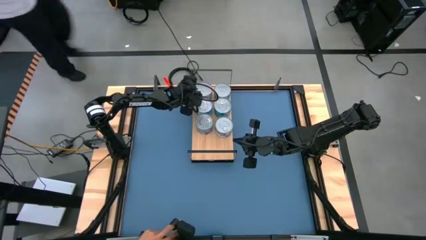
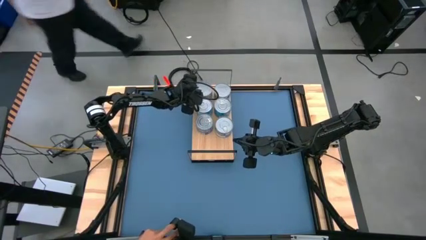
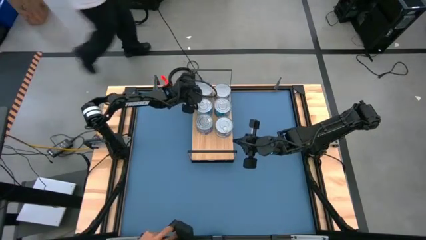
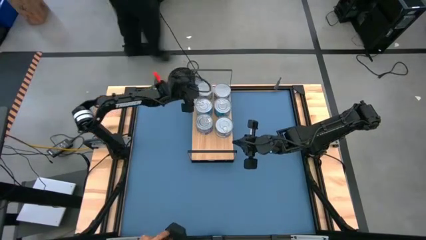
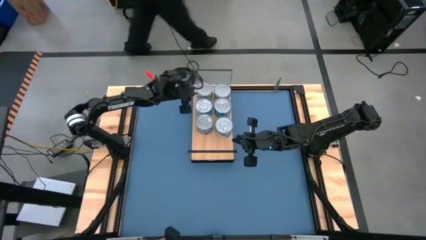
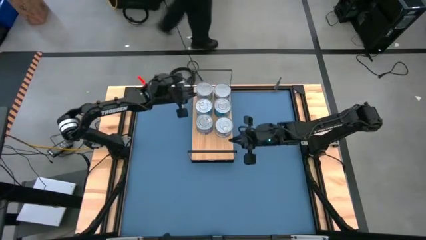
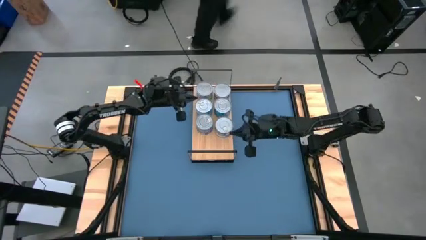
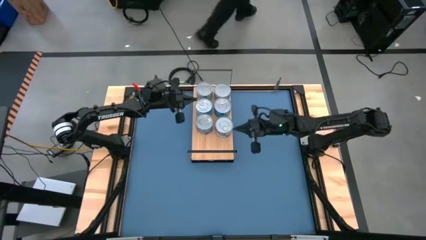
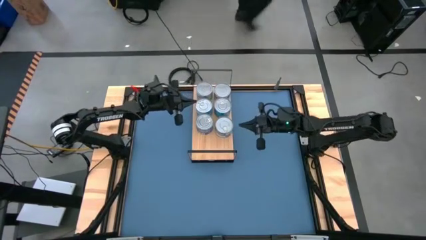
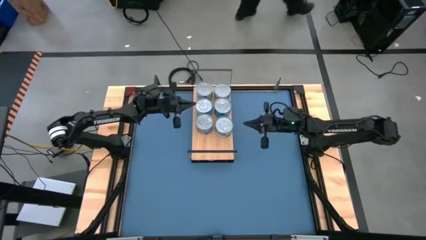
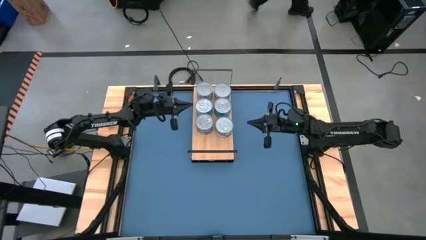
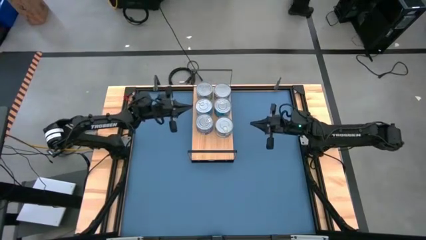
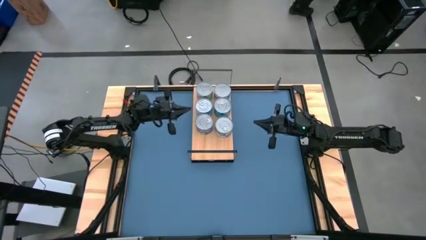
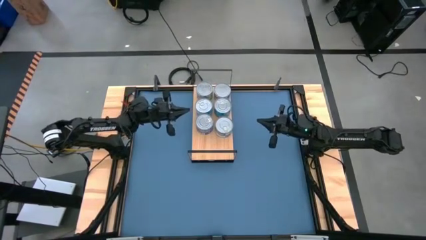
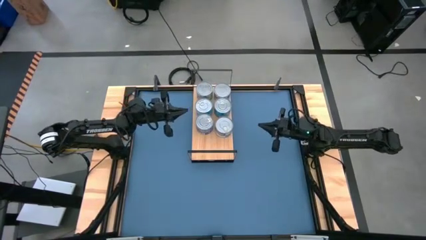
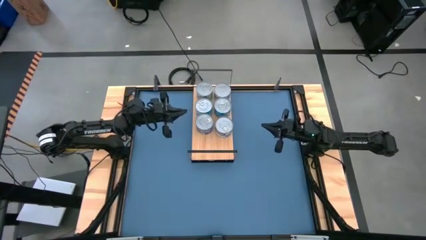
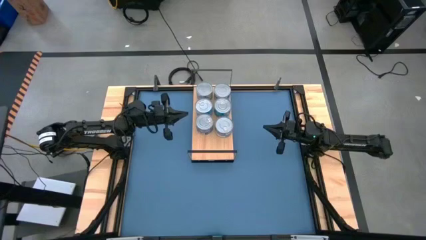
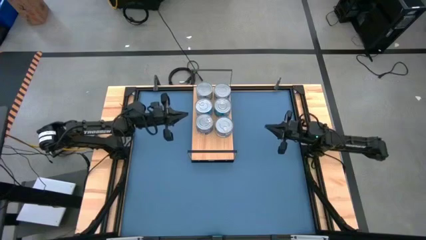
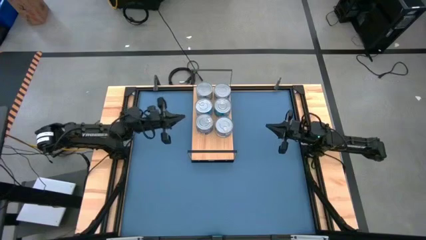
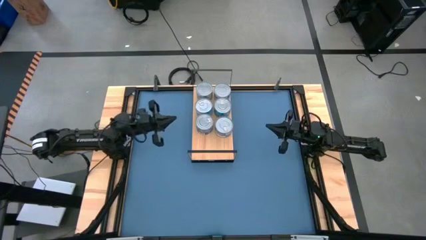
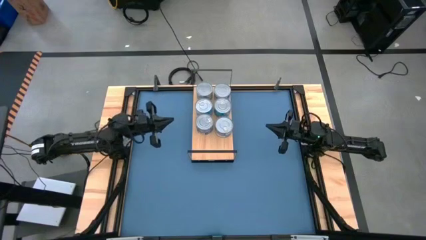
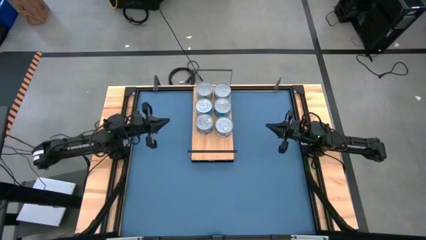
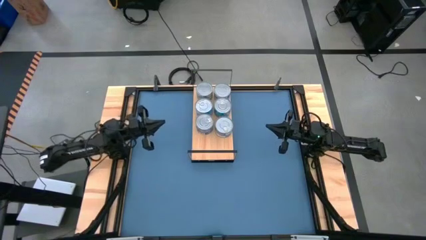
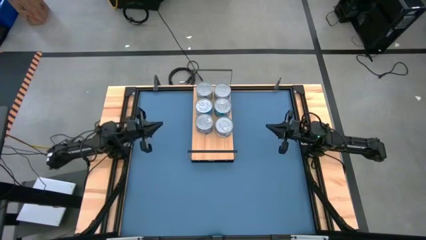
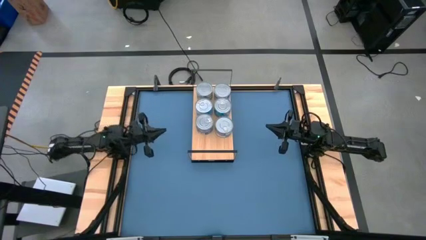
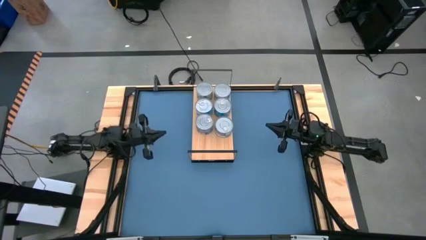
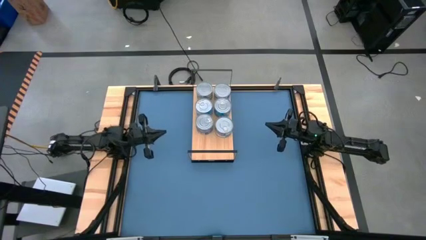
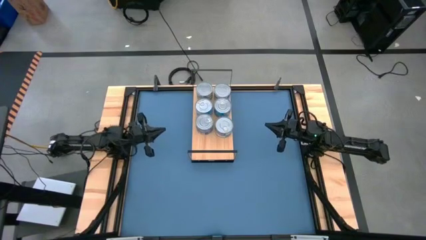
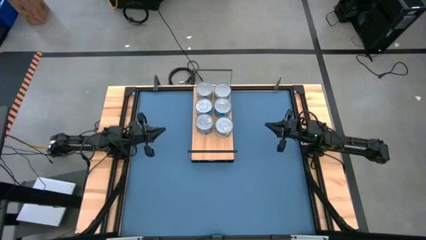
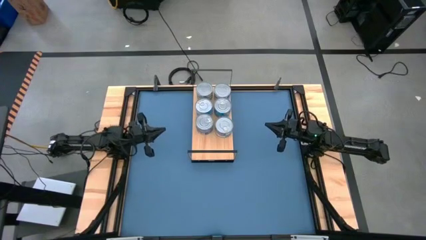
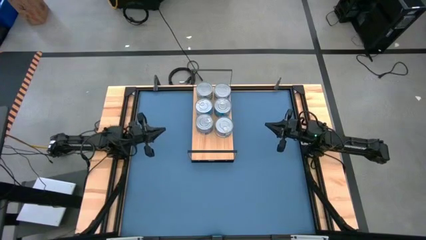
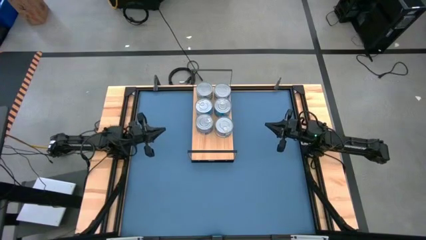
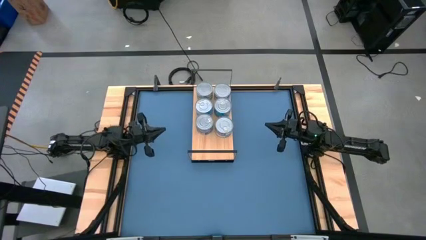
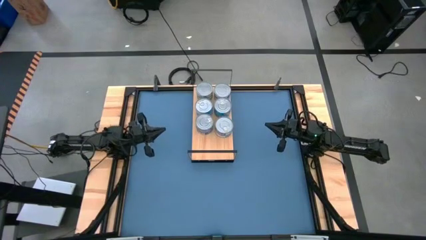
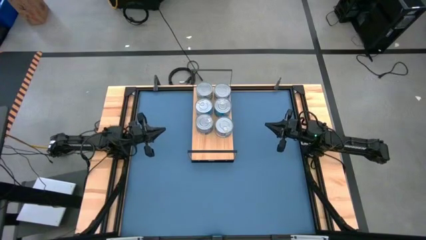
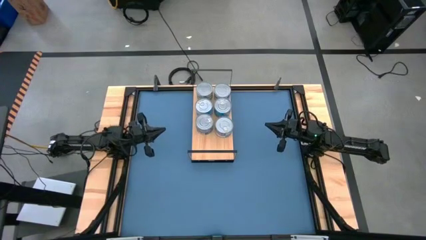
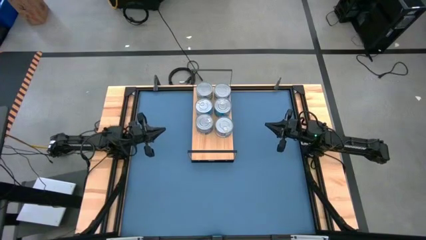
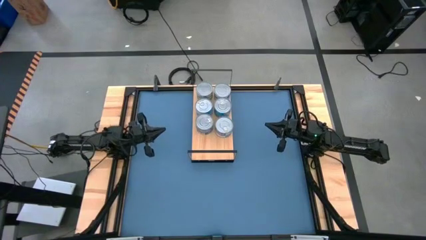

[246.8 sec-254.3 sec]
Task: Stack canned seafood by type on shelf
Return to Home Position

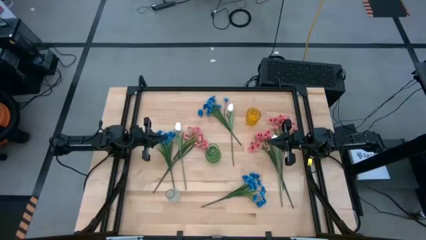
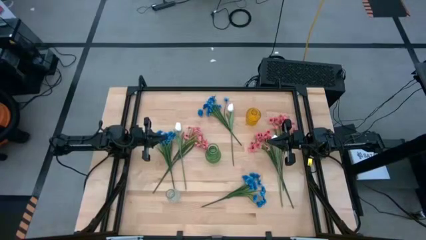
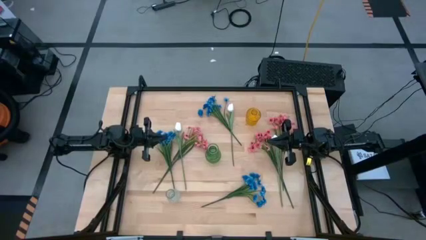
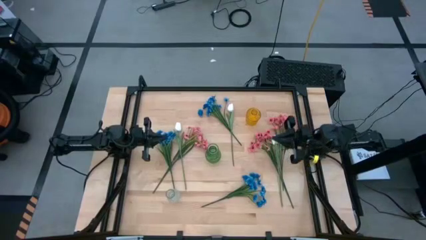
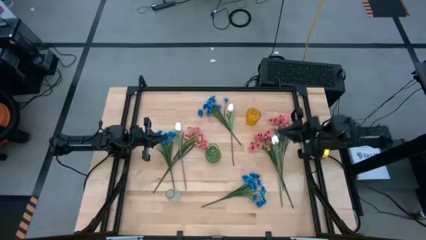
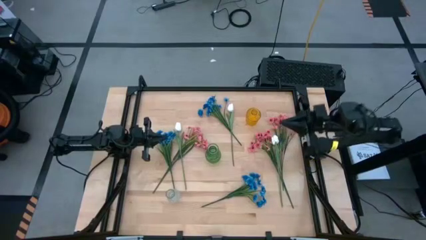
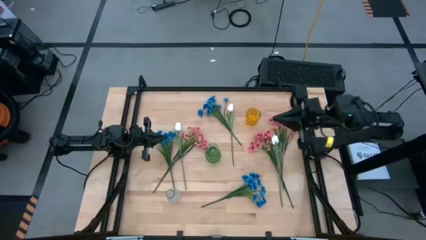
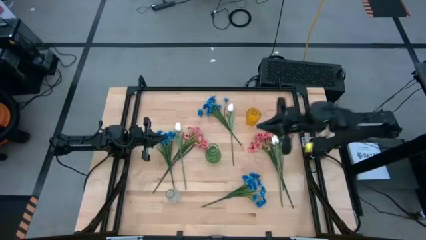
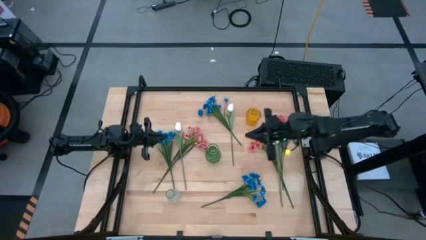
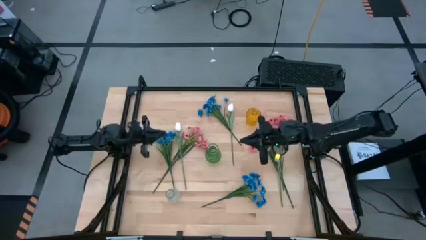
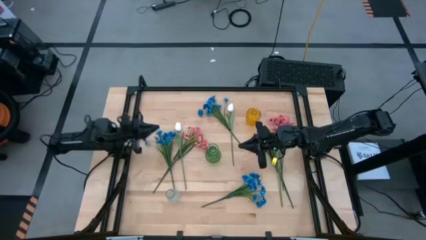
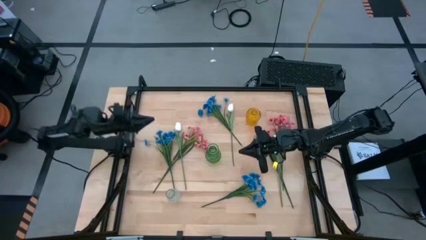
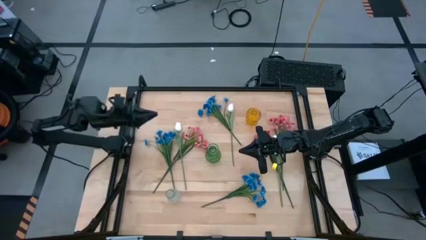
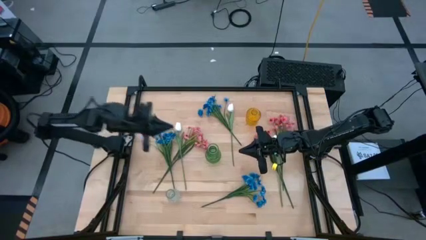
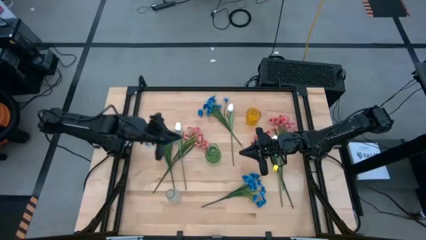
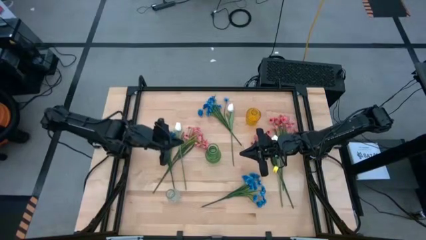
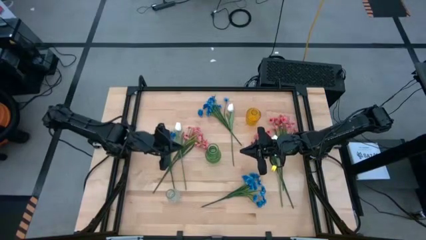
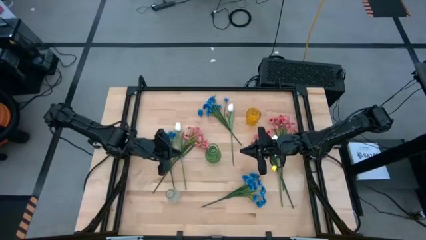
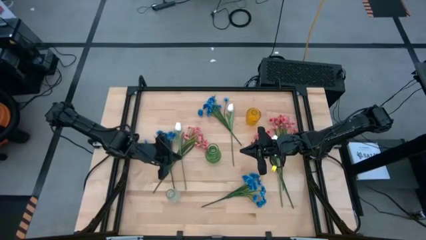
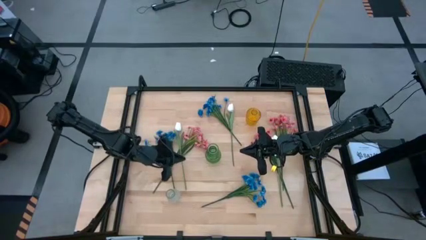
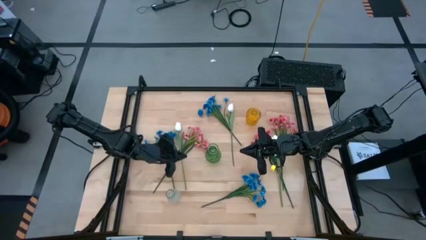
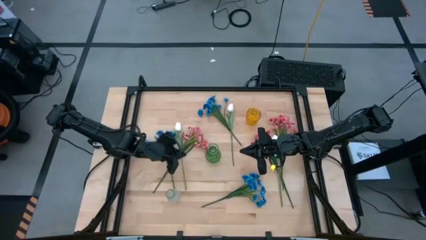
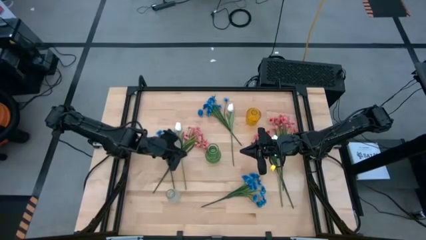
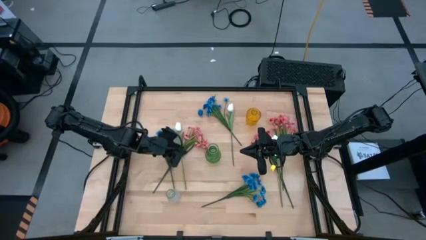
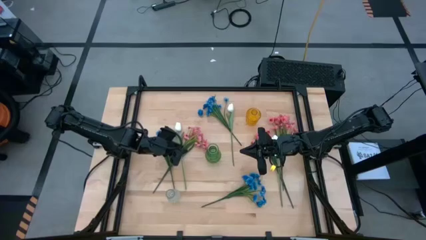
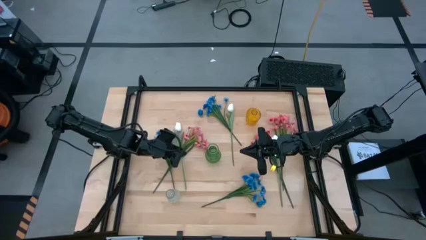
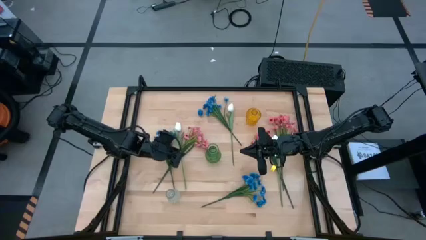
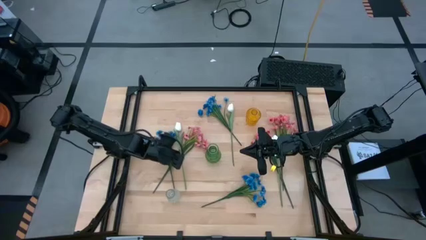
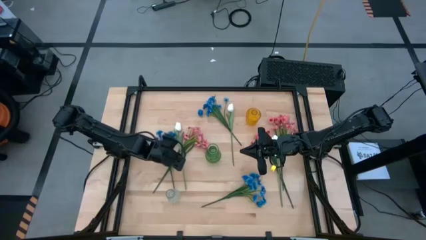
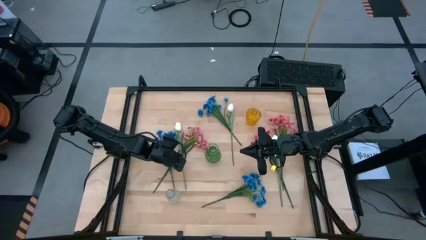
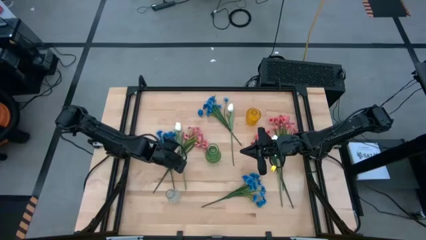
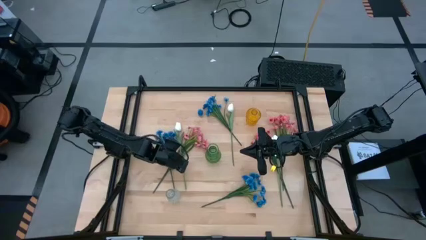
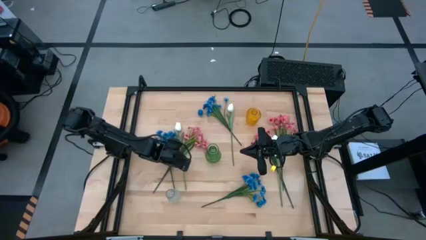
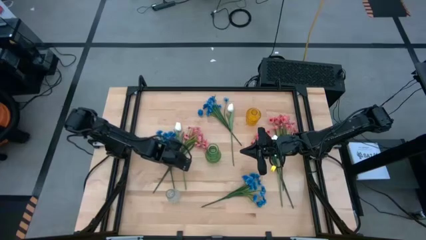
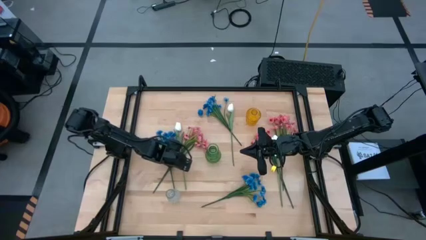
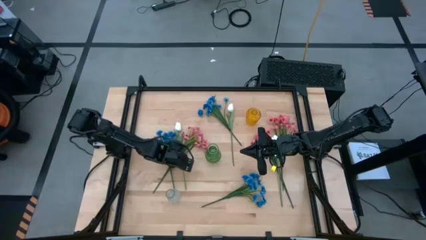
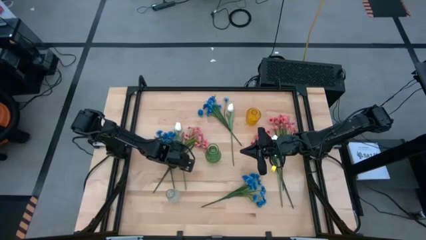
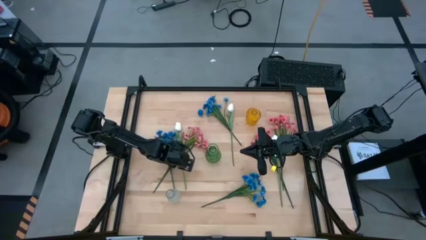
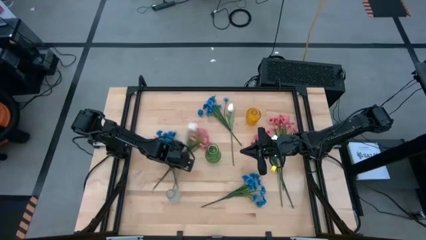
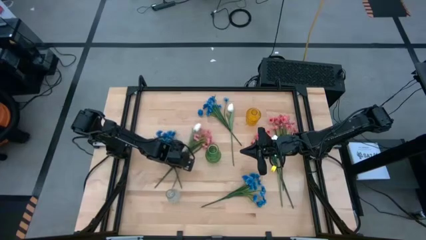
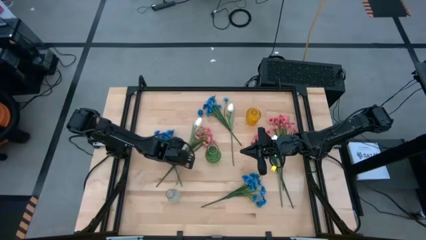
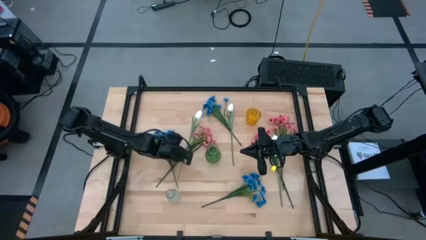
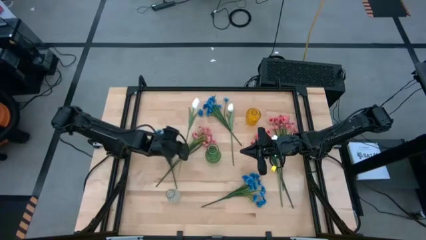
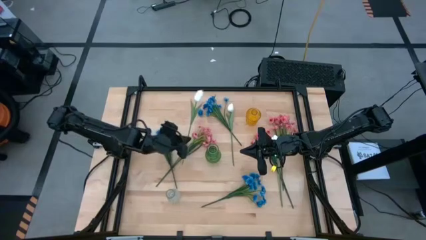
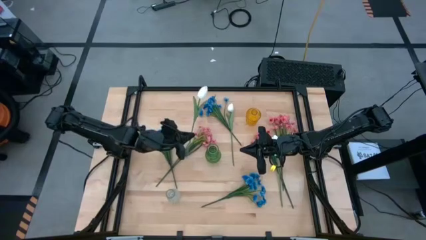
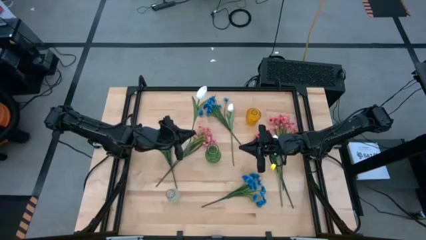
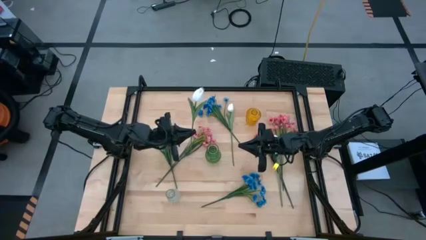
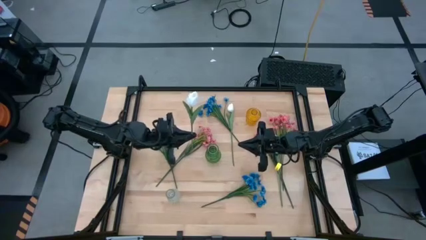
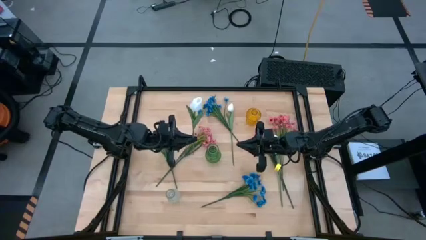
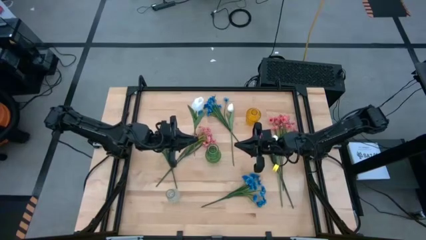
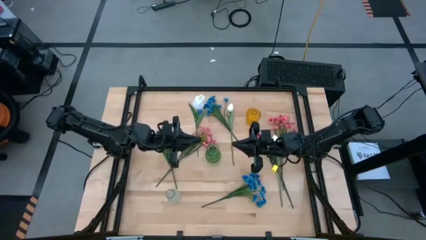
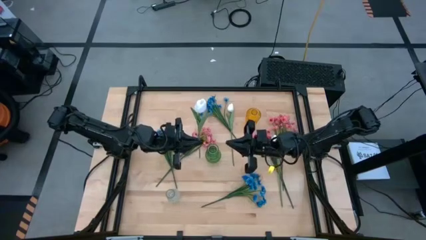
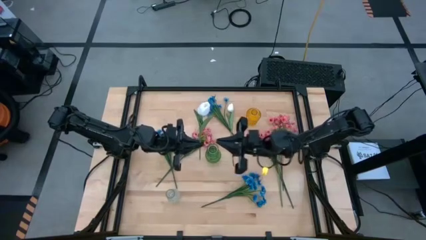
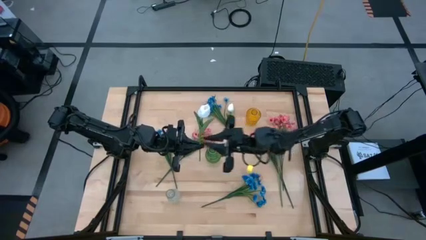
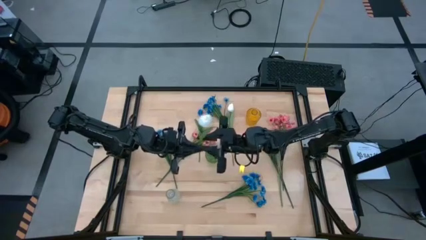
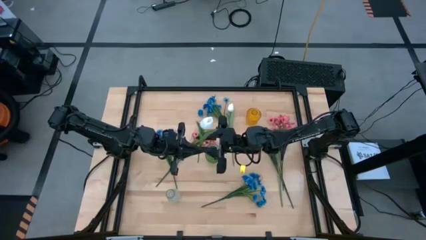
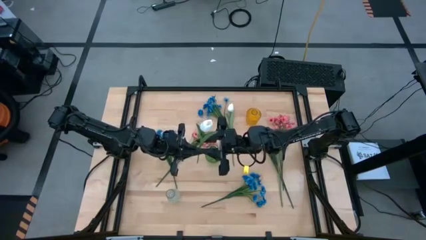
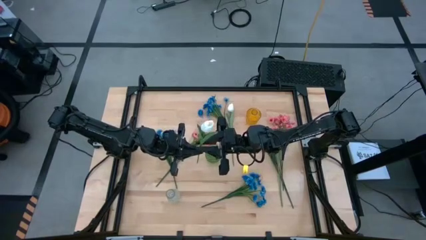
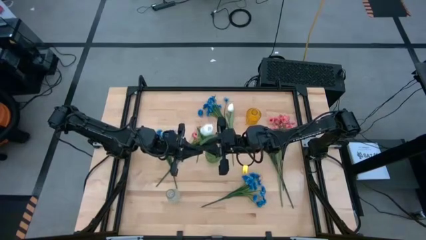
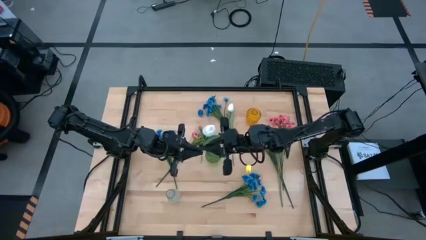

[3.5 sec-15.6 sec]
Task: Sort flowers into vase by color
Put the left white flower into the green vase
